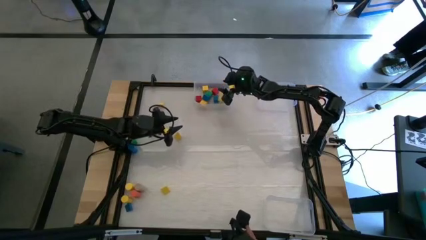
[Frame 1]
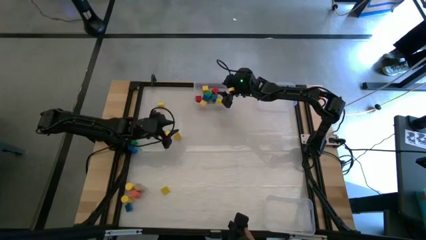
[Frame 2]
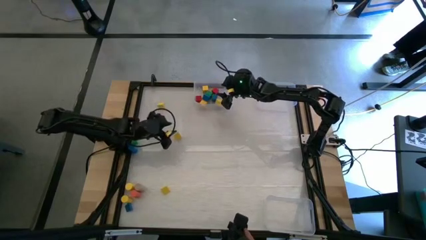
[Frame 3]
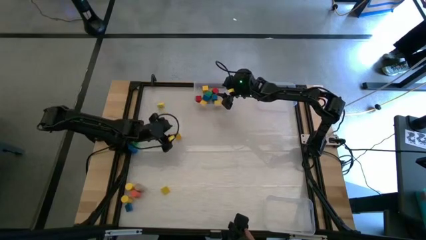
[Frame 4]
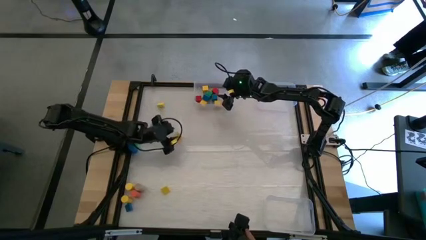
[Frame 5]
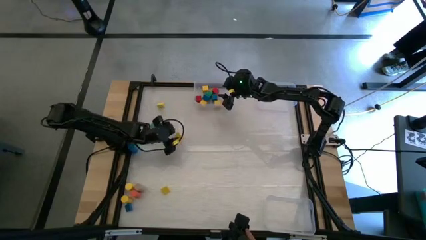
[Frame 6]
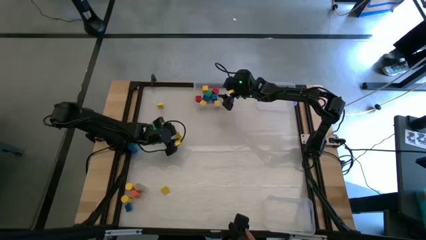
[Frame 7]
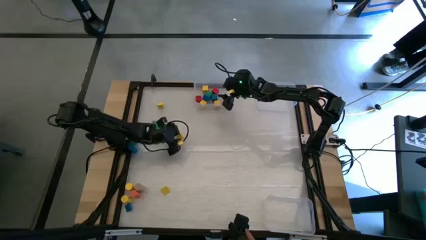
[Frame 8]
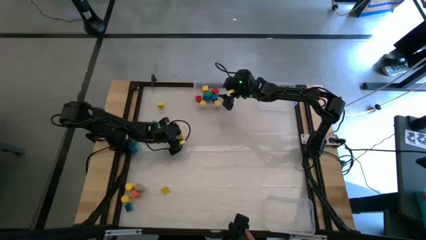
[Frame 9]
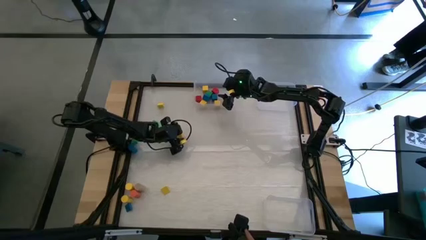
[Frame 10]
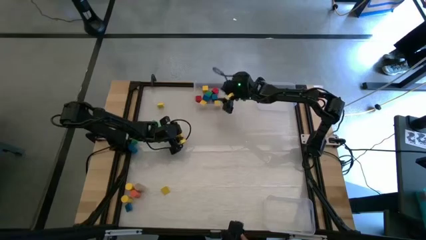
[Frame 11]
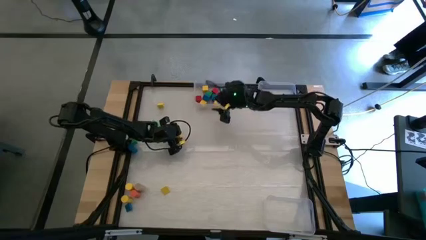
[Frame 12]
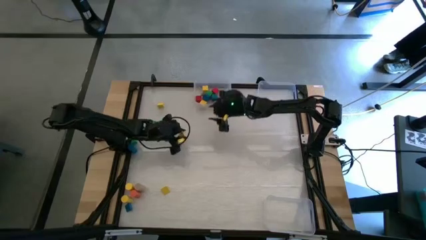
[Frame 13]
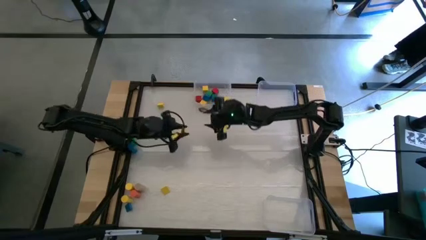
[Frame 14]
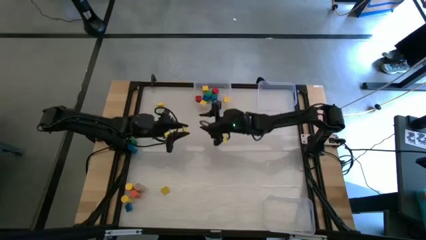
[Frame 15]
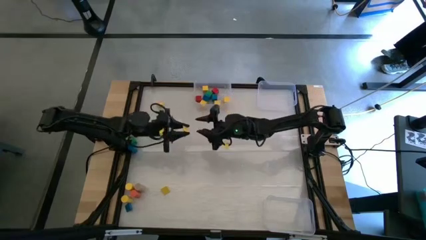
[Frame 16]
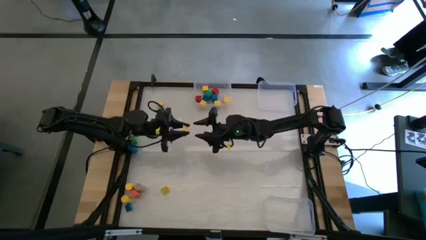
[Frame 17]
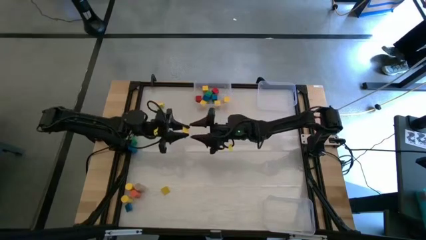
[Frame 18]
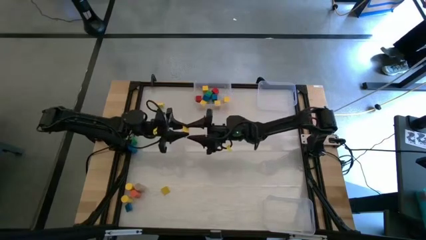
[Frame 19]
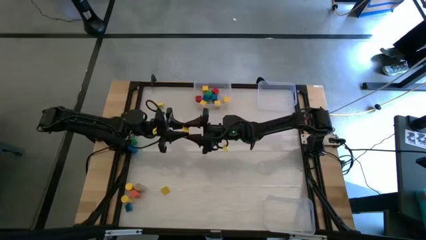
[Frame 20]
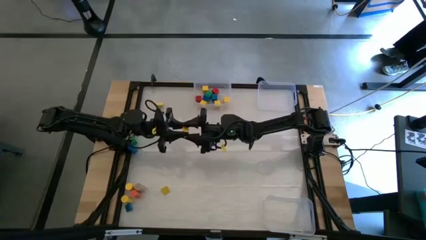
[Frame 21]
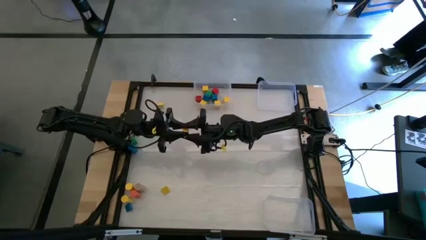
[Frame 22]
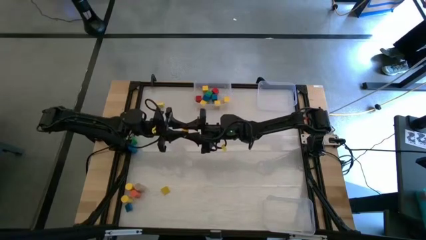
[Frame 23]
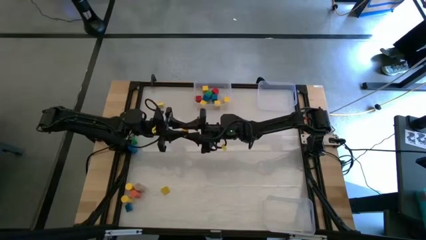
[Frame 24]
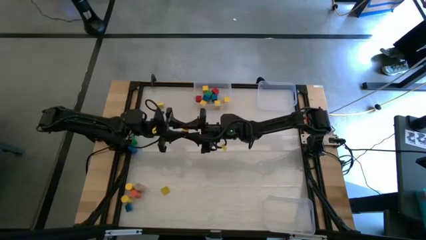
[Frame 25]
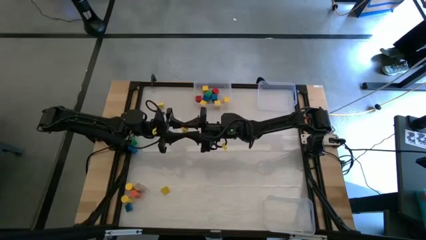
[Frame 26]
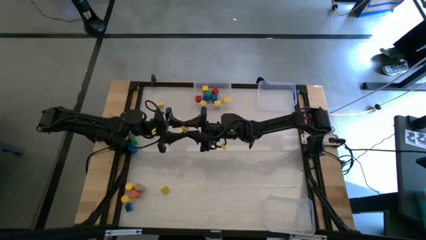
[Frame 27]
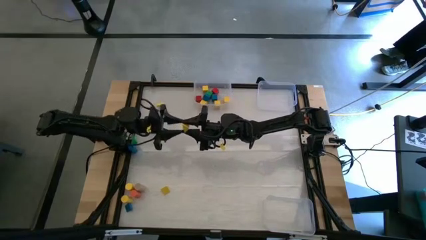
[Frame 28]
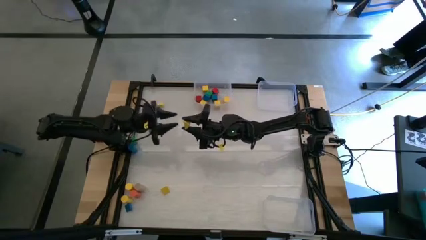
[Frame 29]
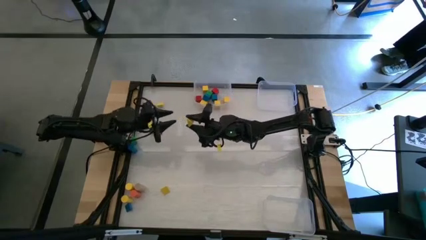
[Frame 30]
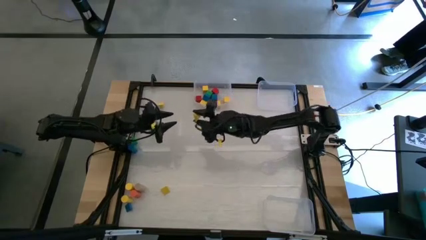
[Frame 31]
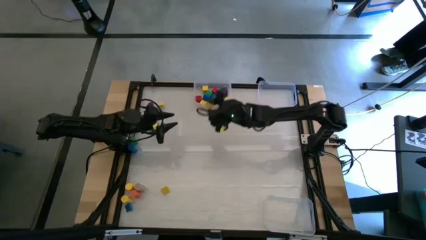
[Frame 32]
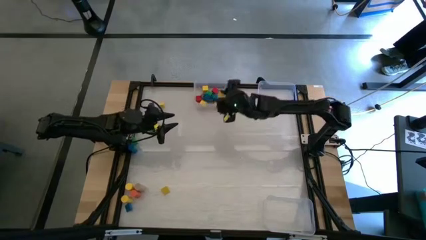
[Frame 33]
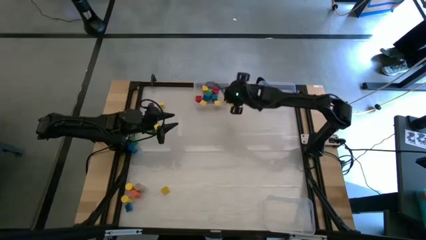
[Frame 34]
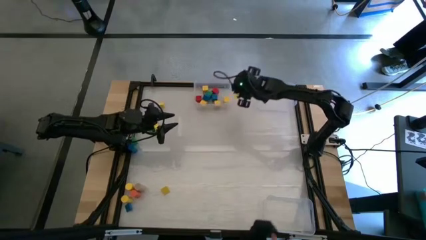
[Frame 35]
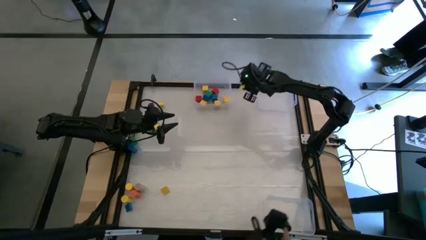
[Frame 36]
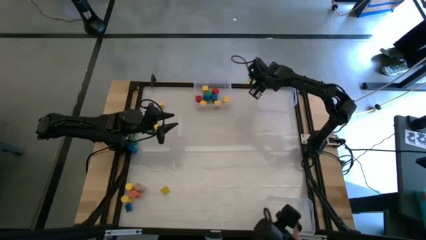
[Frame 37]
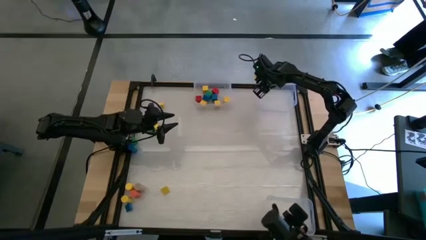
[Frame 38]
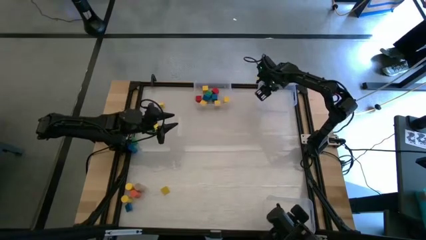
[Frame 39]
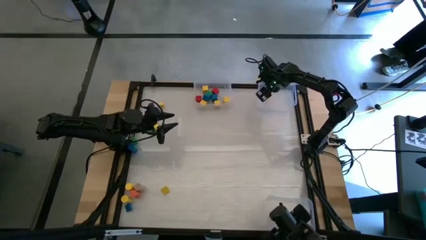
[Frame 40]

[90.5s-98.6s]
Task: Sort blocks by size
Put the triangle yellow block into the top right transparent bin

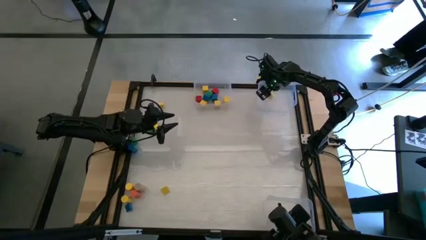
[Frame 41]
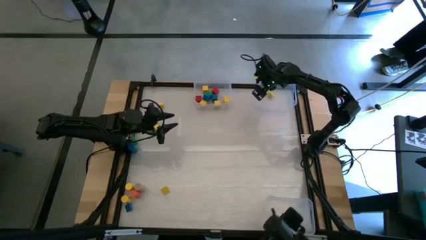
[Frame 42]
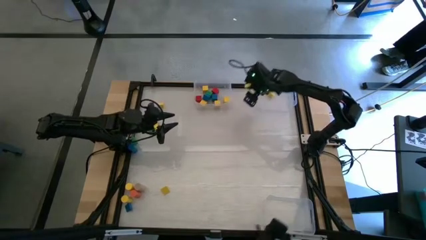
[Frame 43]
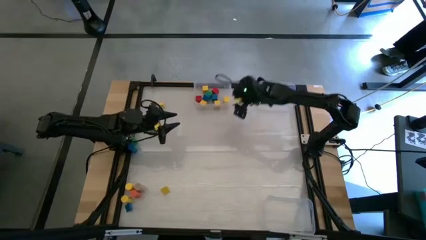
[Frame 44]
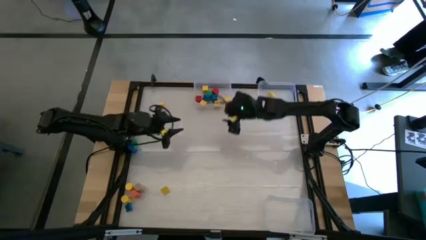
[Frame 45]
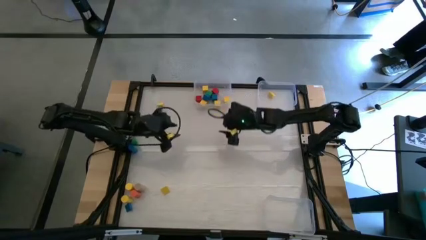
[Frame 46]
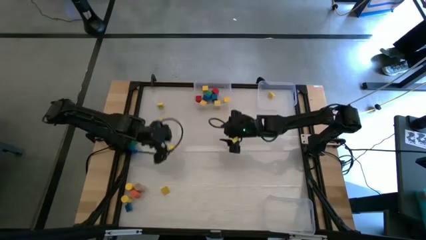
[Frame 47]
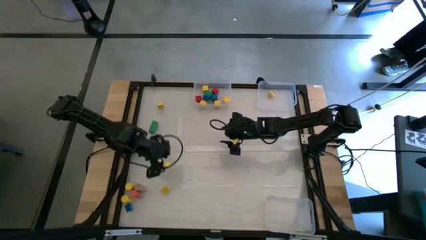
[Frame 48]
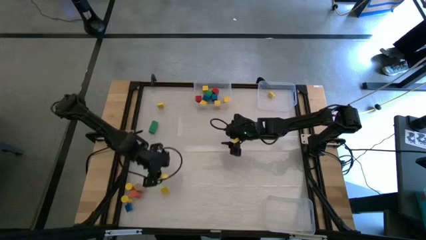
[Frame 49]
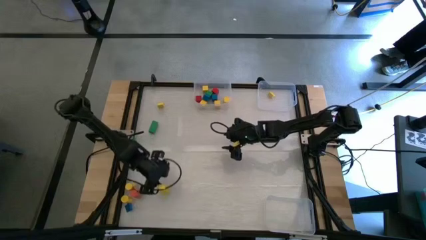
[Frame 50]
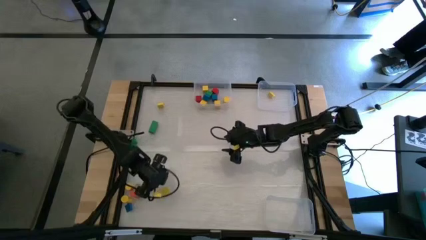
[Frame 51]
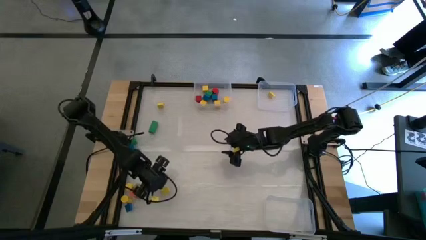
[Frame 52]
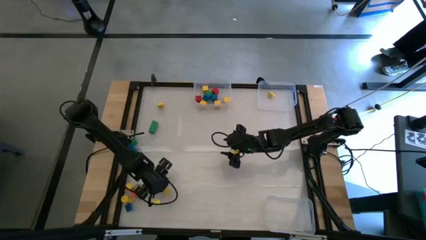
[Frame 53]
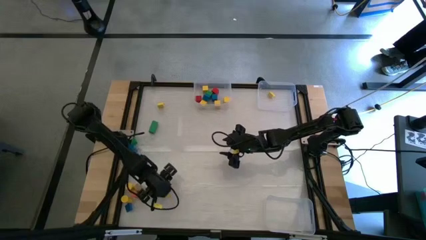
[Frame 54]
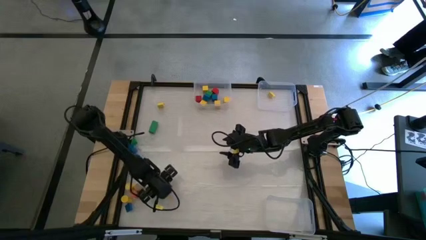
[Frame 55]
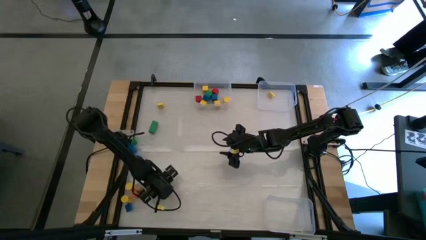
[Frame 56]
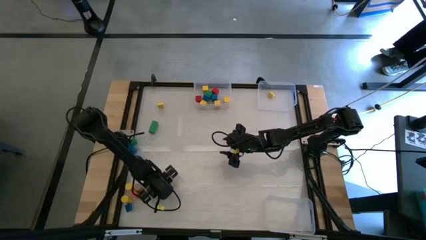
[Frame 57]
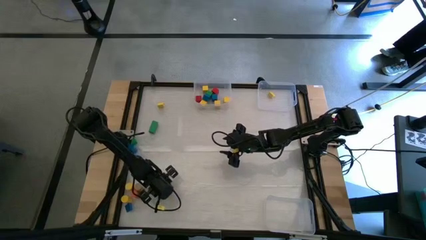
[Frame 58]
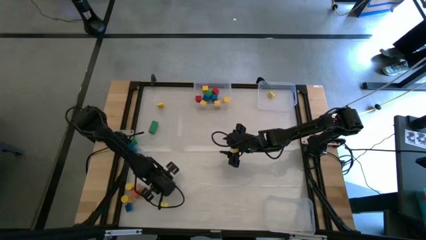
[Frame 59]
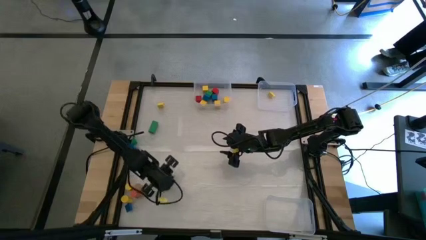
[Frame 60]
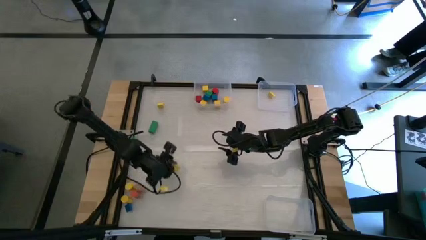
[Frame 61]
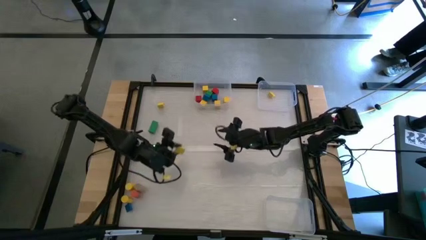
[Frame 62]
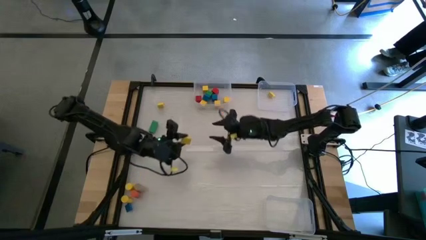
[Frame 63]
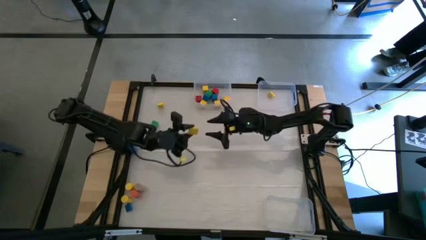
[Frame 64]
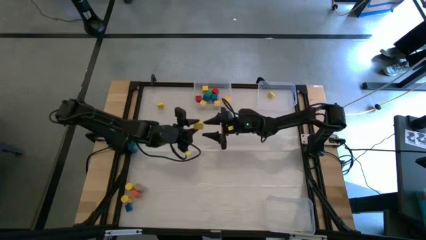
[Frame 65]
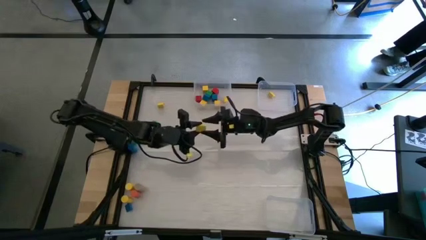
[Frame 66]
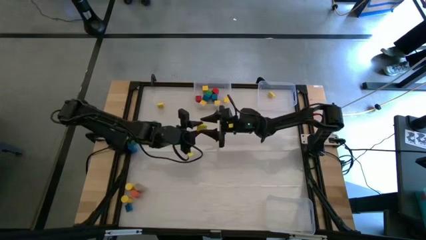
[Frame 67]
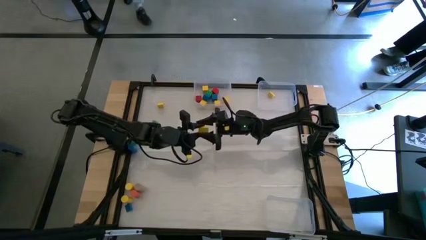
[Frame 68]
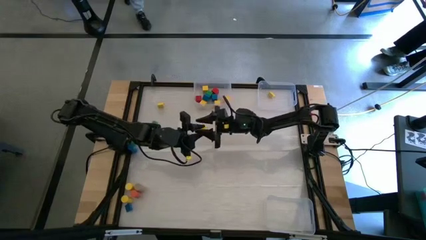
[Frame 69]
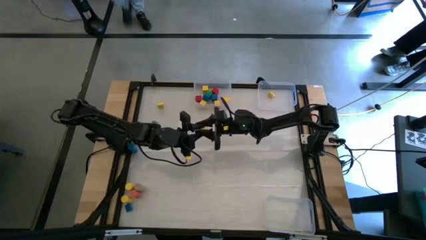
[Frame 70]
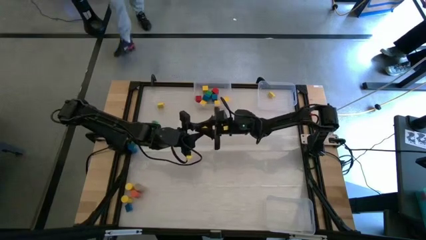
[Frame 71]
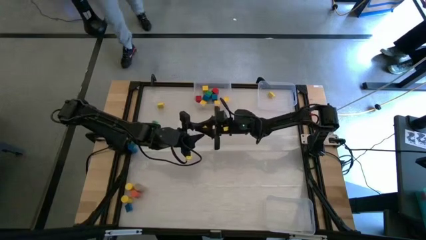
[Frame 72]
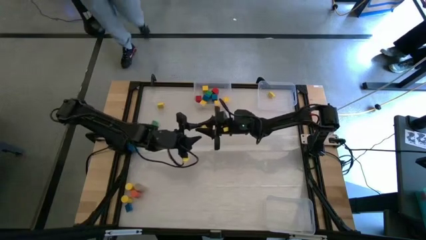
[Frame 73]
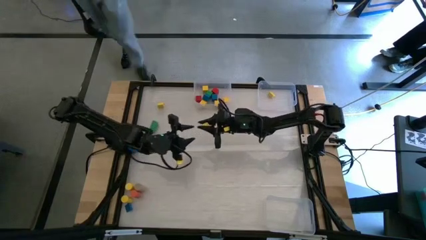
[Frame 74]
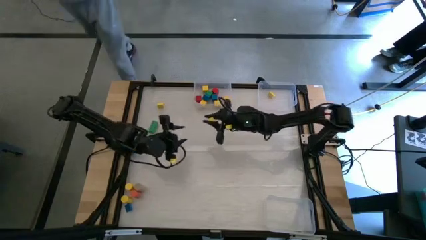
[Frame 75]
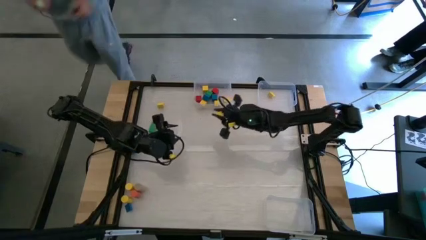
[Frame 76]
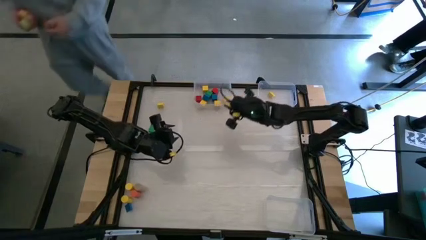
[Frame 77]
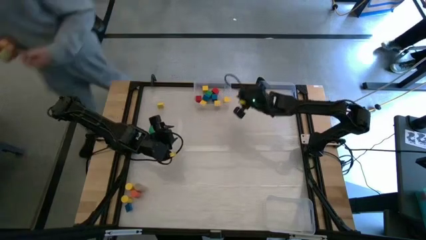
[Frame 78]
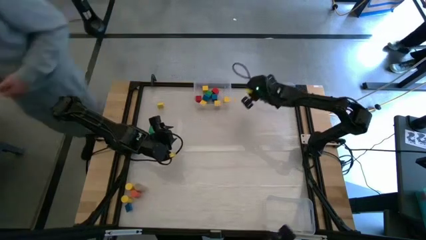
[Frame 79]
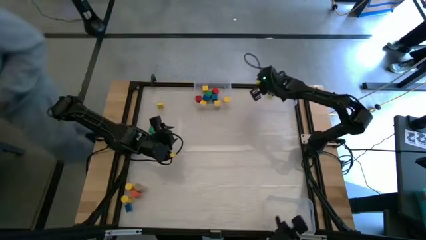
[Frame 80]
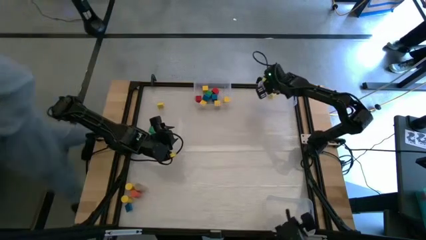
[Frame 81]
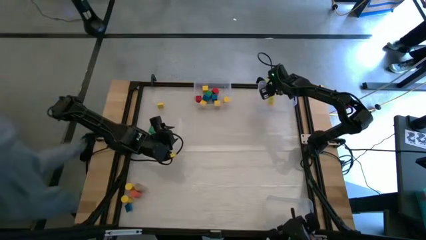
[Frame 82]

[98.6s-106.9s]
Put the triangle yellow block into the top right transparent bin
